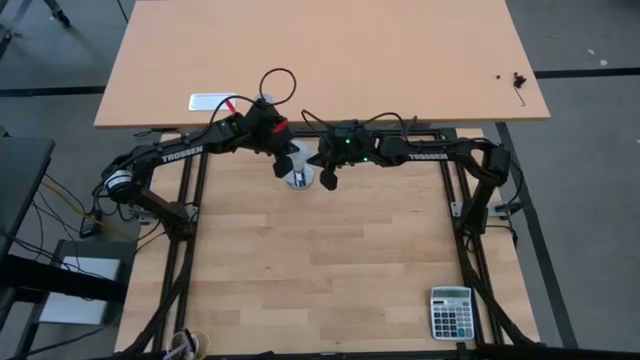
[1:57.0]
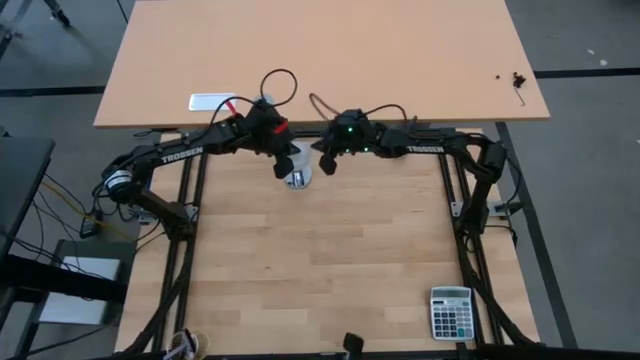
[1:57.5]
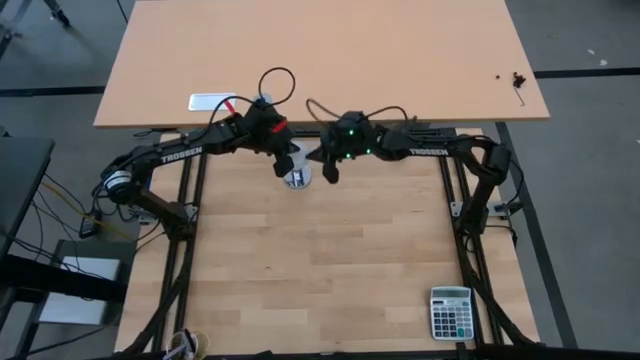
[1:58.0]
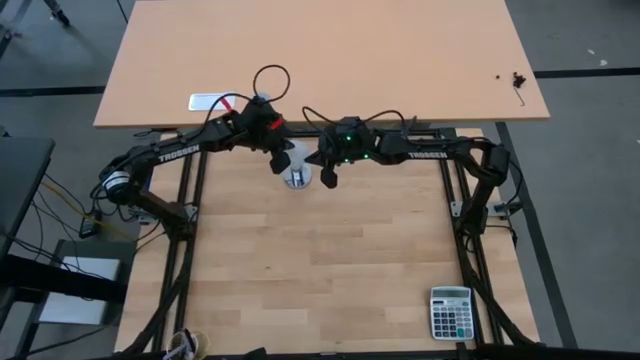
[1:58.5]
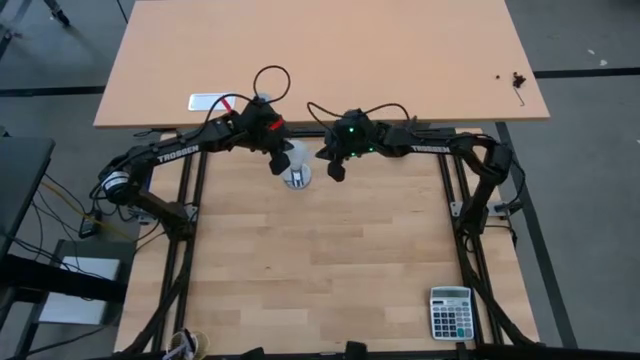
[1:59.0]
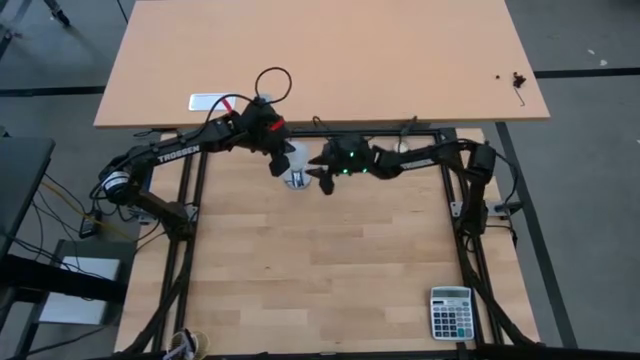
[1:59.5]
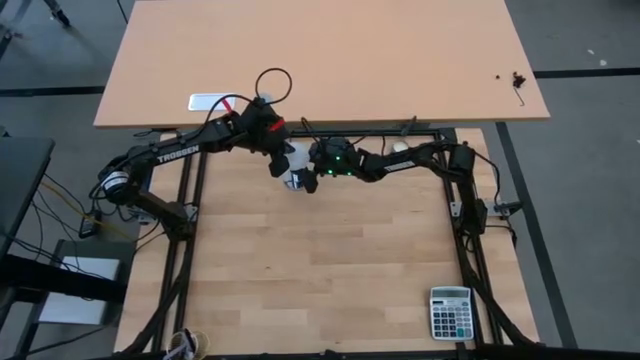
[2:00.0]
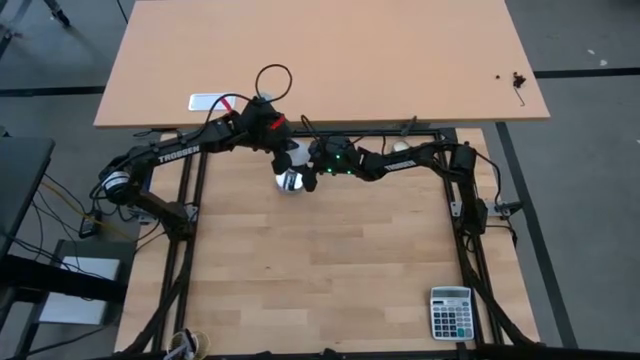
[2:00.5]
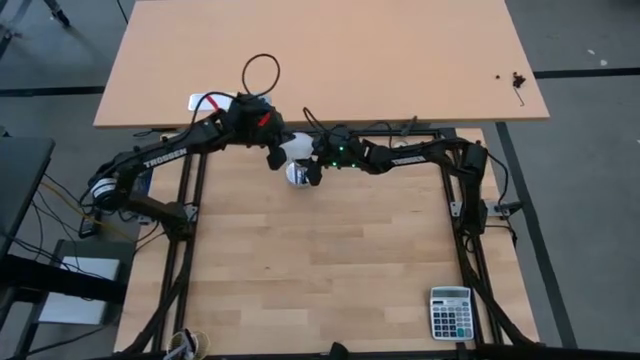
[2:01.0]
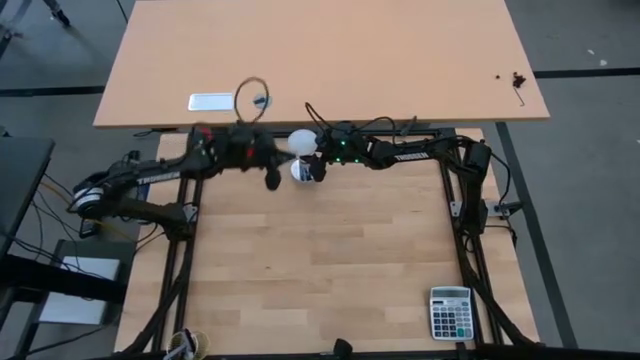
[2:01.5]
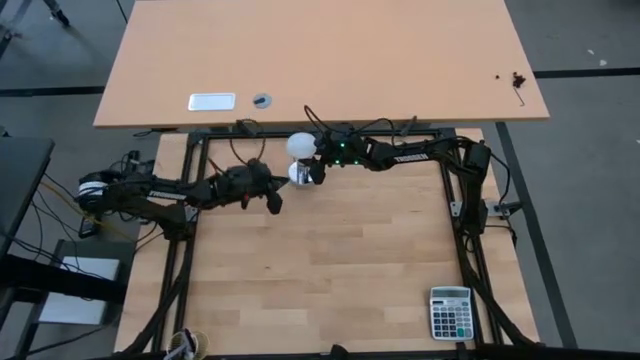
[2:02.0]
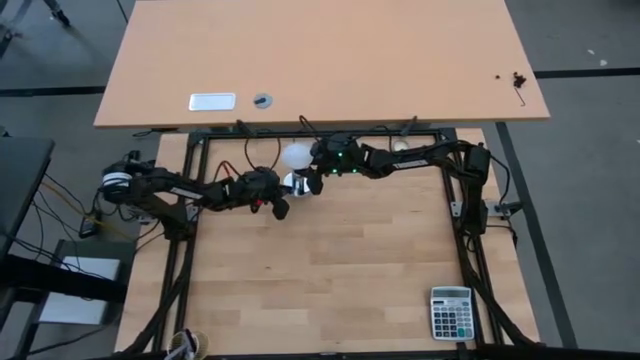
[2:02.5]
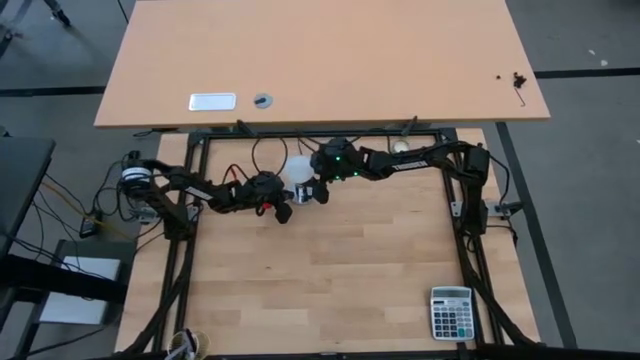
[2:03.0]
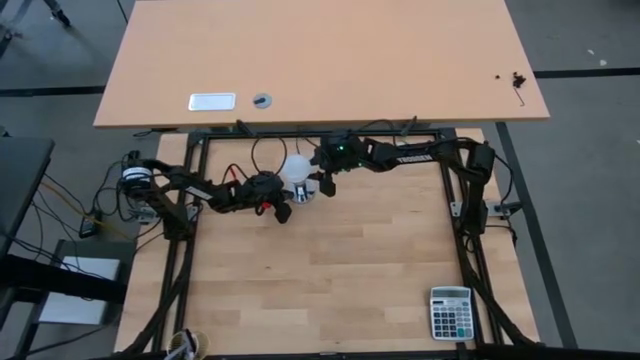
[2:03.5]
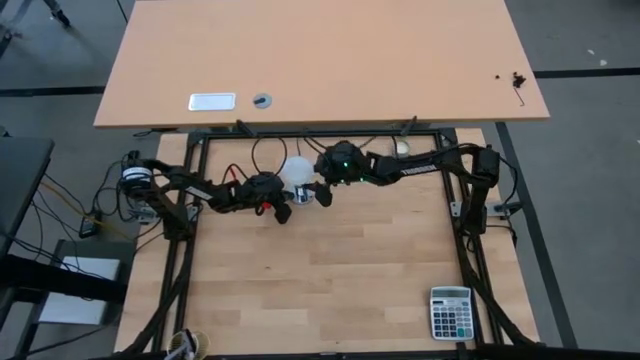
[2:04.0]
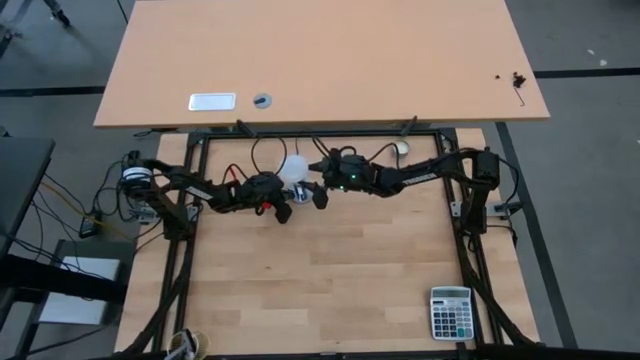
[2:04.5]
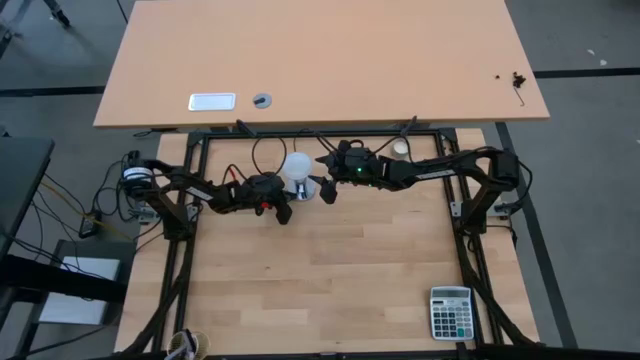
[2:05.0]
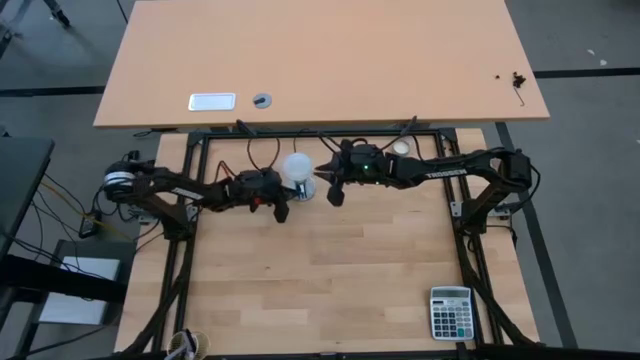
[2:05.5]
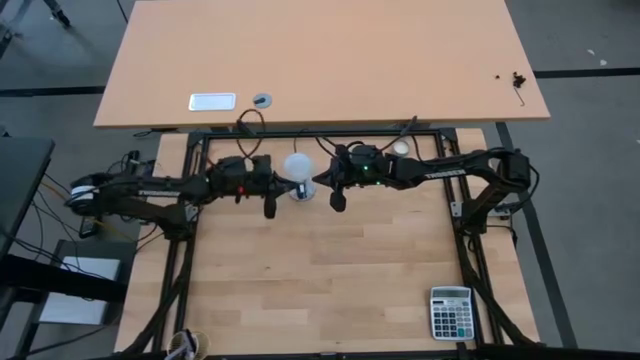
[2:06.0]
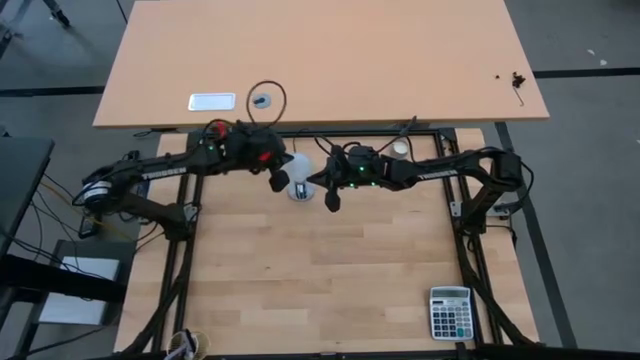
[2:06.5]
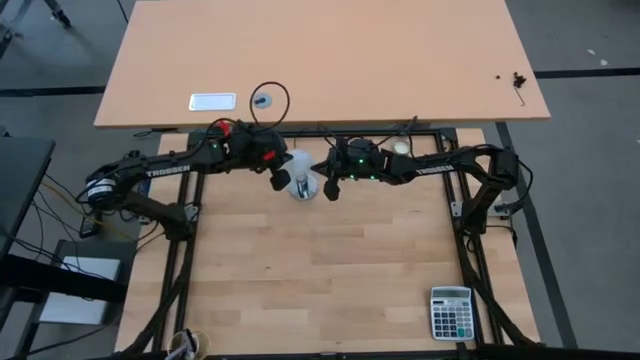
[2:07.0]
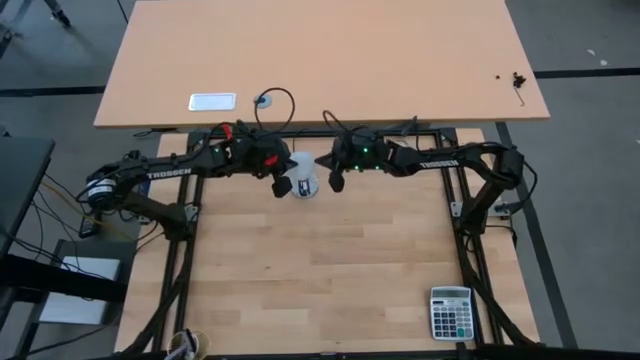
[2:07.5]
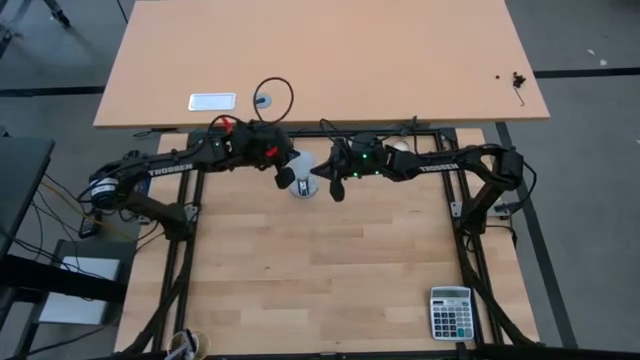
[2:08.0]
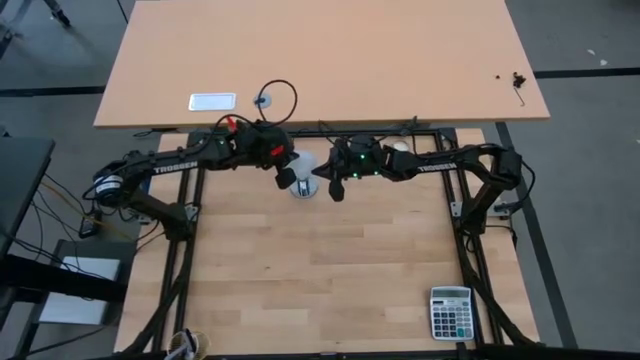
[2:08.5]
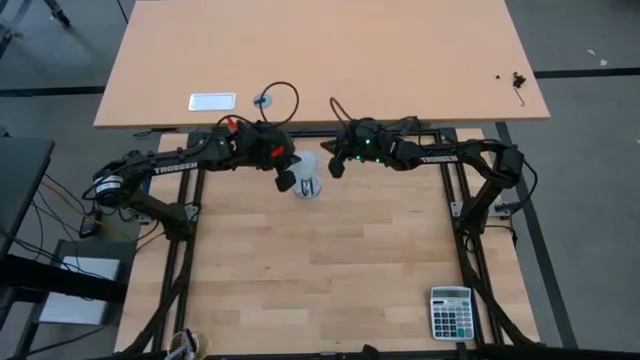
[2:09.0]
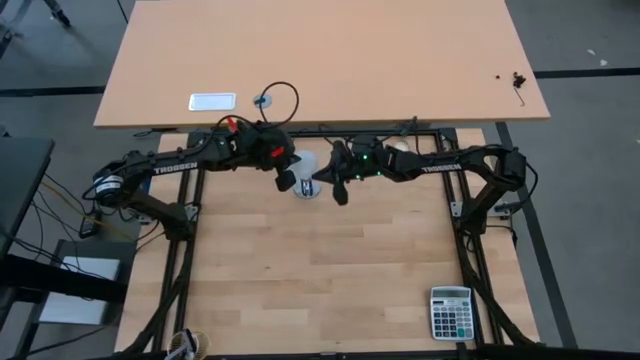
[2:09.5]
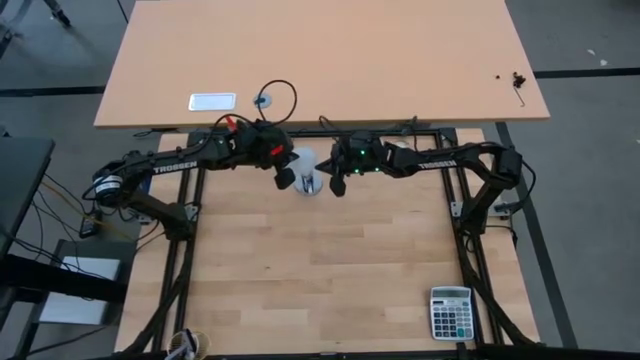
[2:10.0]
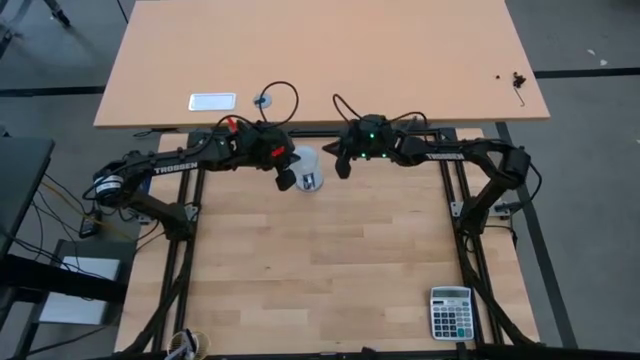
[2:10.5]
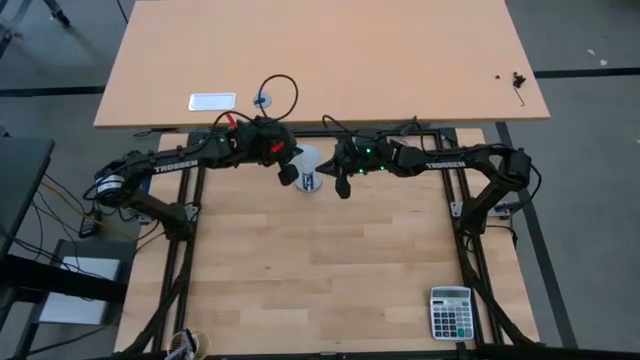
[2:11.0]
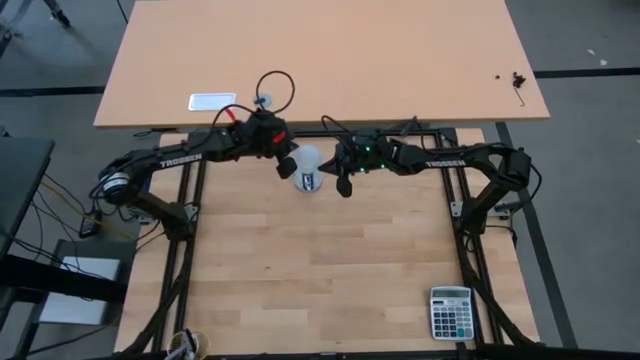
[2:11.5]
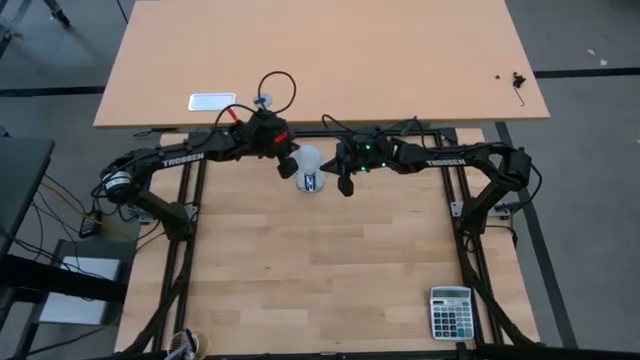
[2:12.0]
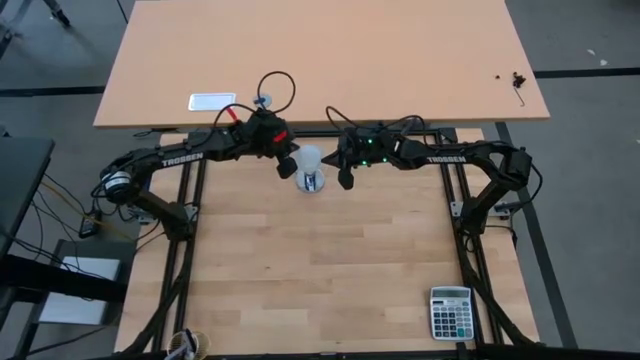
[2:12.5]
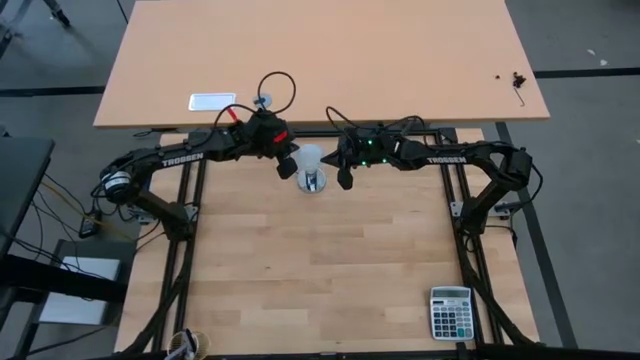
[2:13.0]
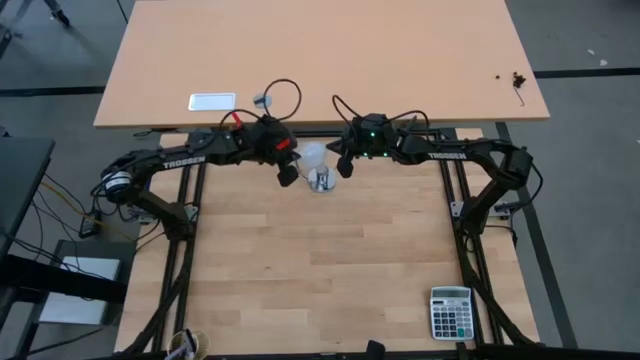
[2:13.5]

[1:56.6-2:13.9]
Task: Screw lightbulb
Remove the bulb from the lamp socket
